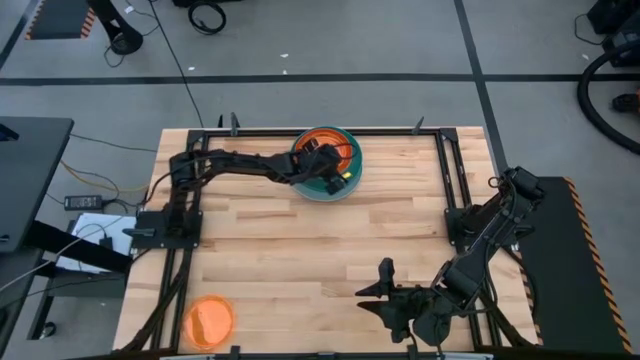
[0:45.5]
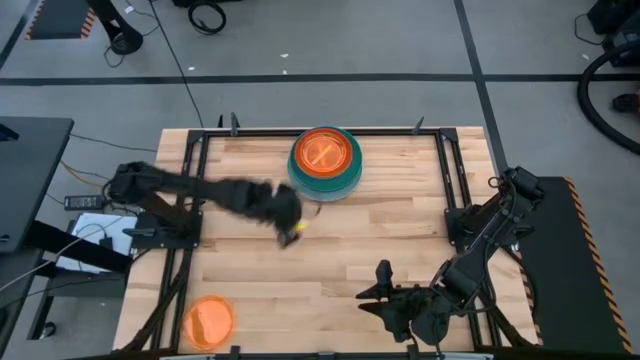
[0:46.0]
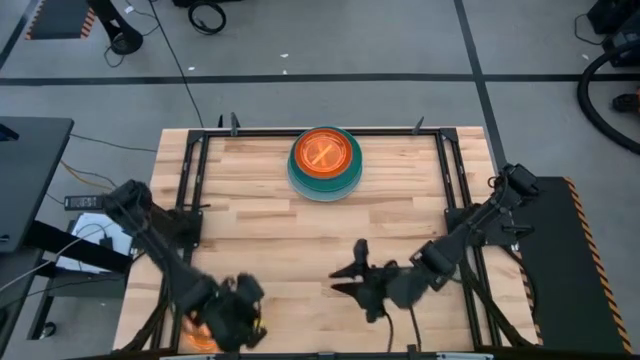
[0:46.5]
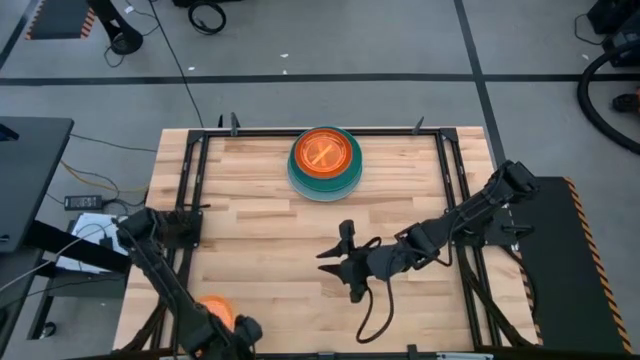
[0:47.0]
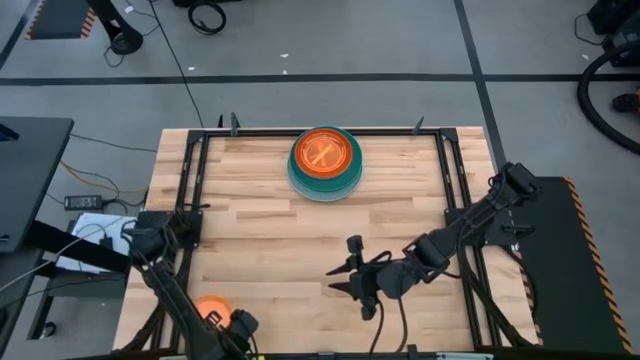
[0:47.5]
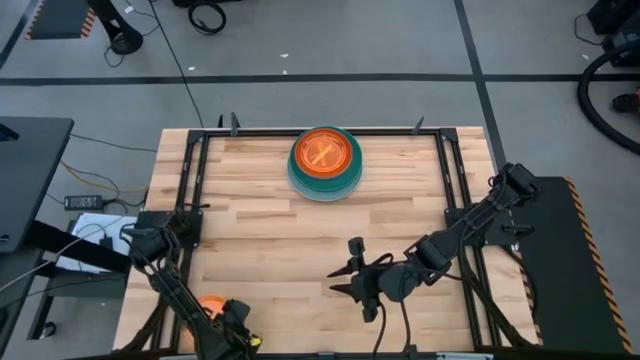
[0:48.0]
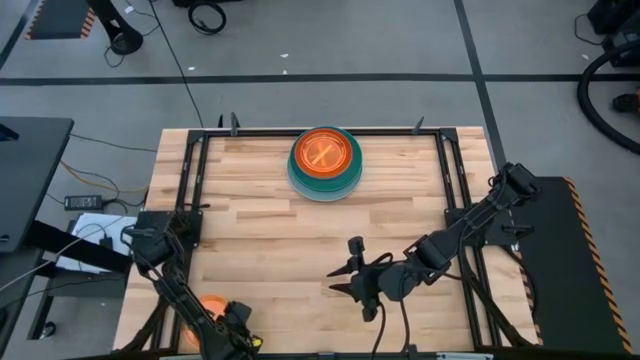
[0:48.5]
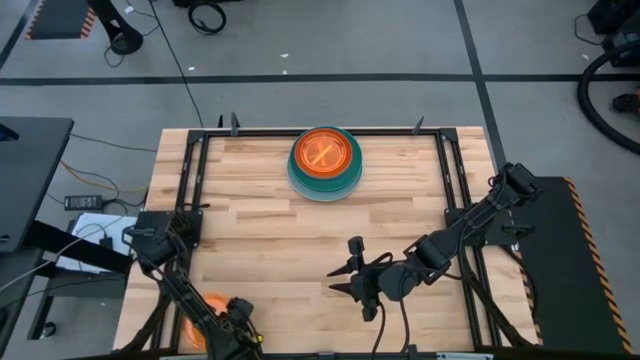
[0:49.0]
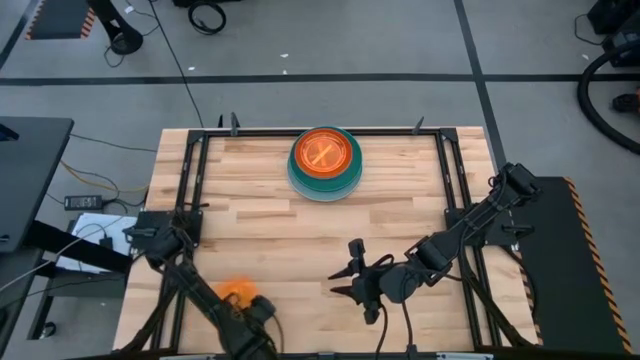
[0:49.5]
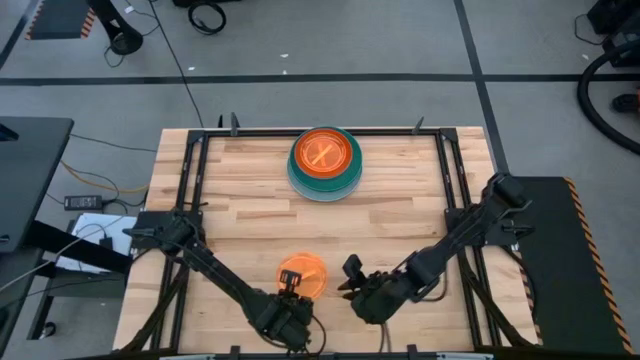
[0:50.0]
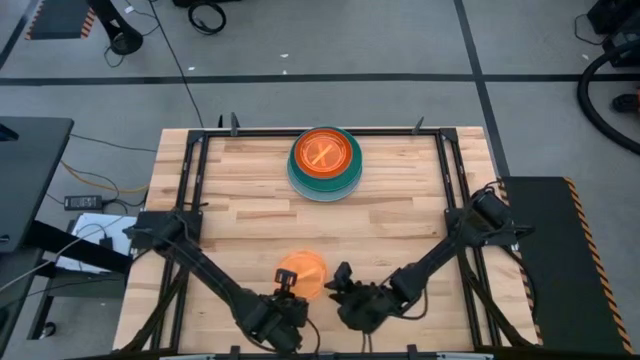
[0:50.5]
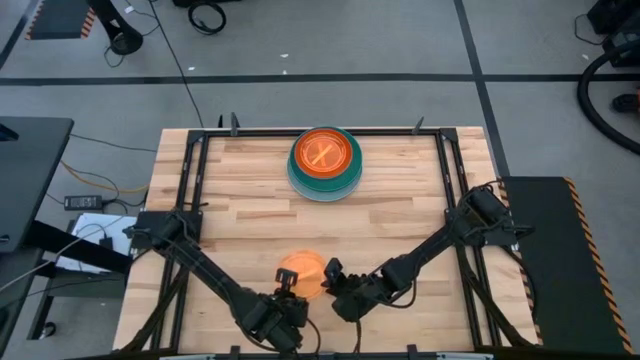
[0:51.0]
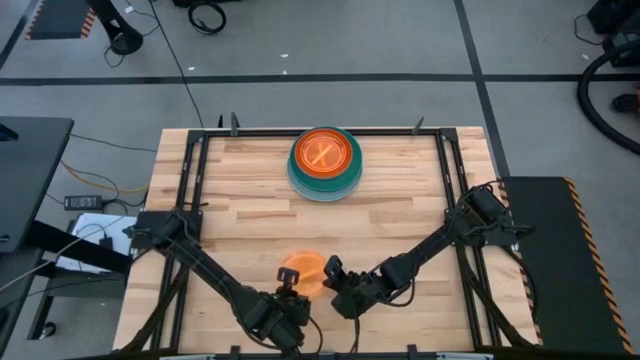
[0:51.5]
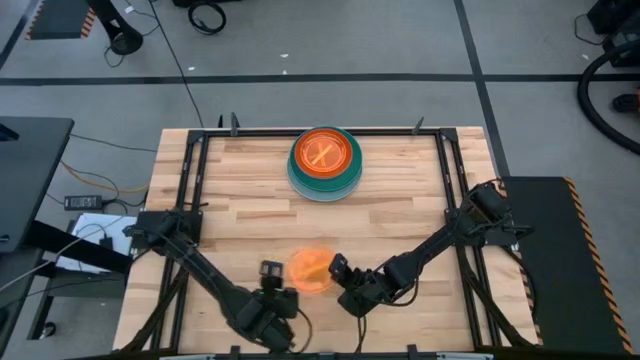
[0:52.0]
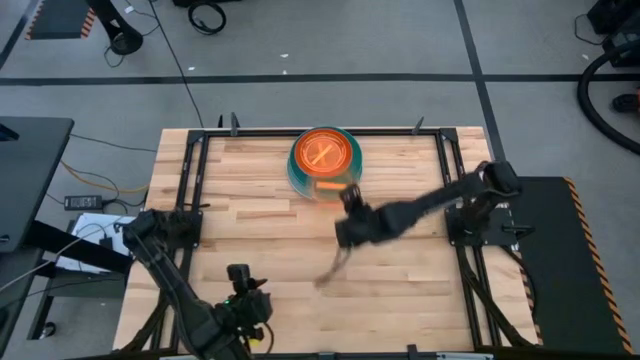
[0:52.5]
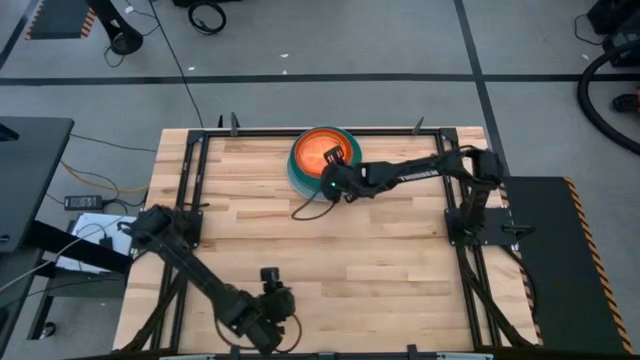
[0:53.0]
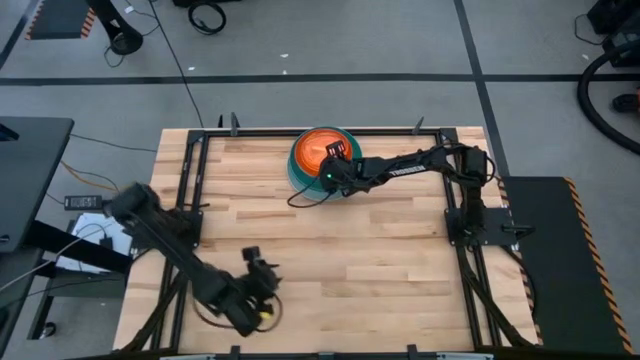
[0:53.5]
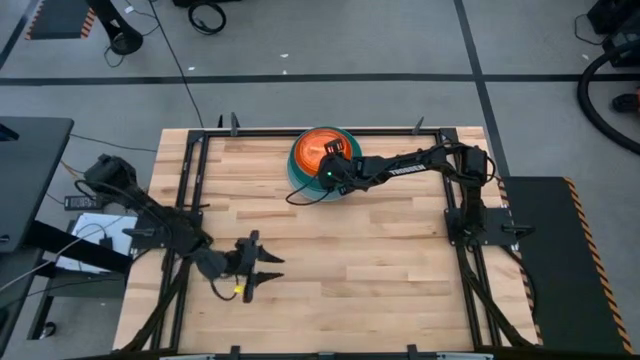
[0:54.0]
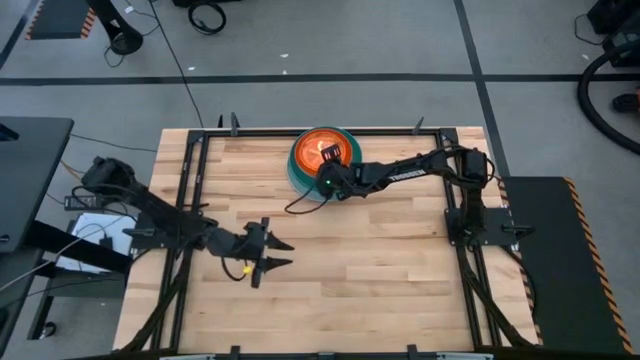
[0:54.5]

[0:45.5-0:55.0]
Task: Stack plastic plates
Stack the orange plate on top of the orange plate

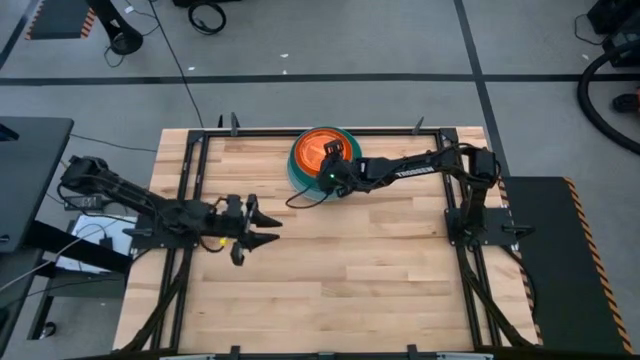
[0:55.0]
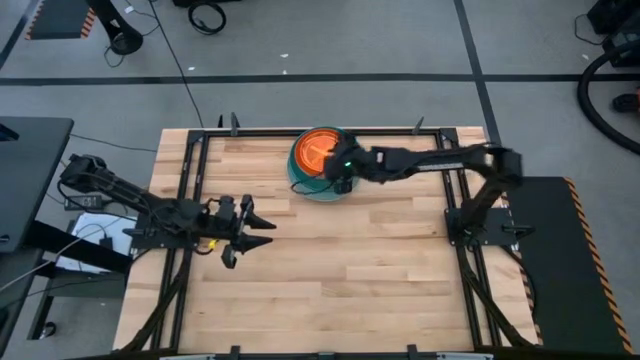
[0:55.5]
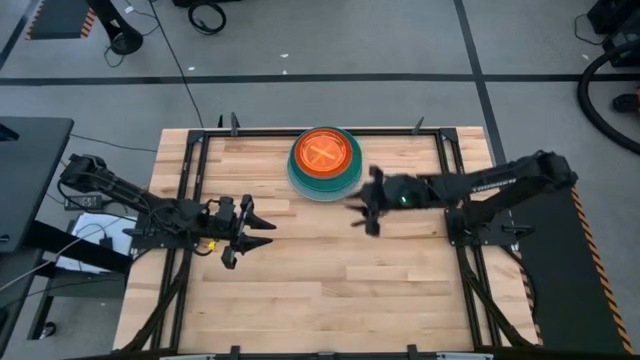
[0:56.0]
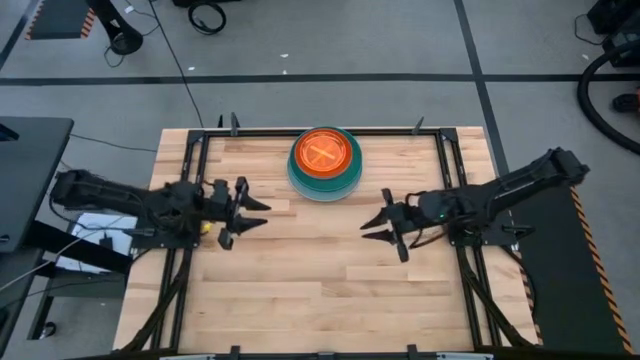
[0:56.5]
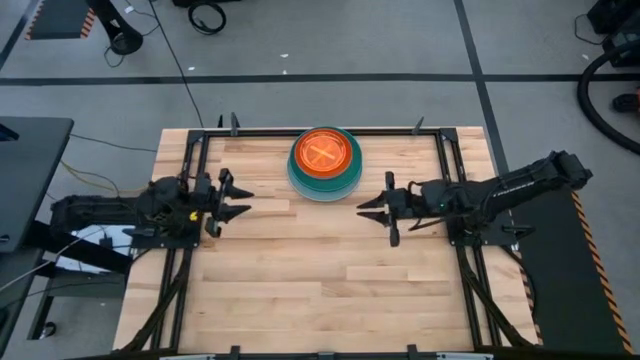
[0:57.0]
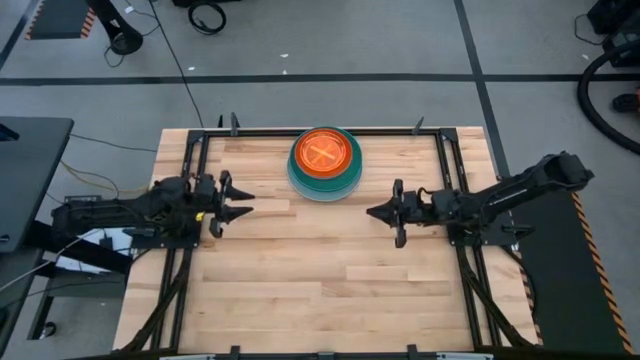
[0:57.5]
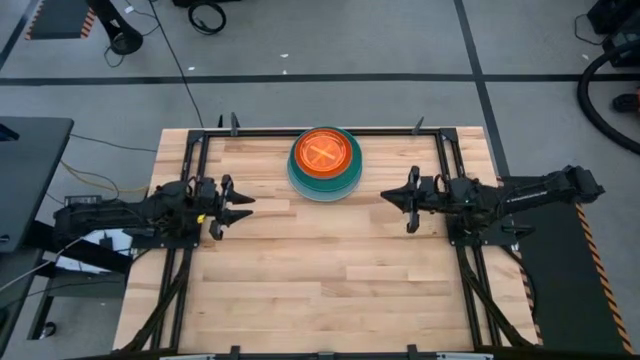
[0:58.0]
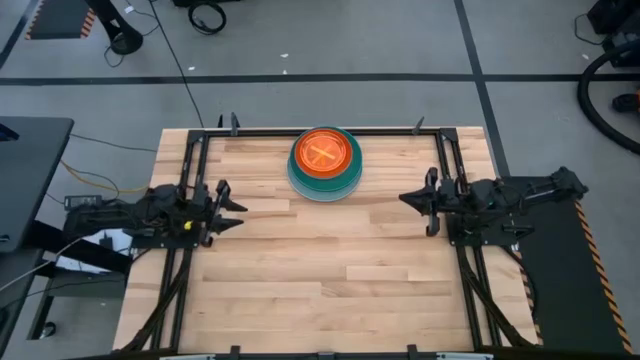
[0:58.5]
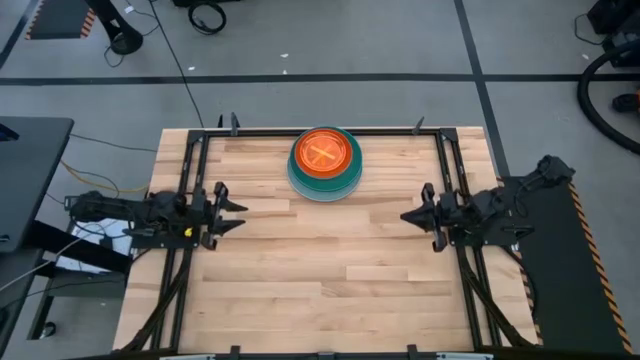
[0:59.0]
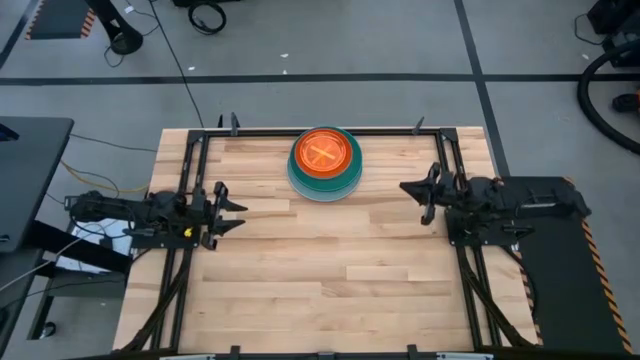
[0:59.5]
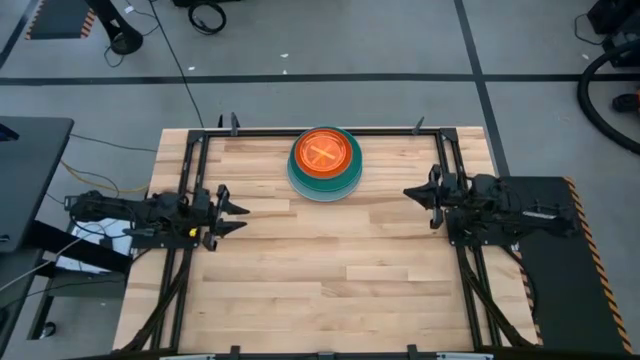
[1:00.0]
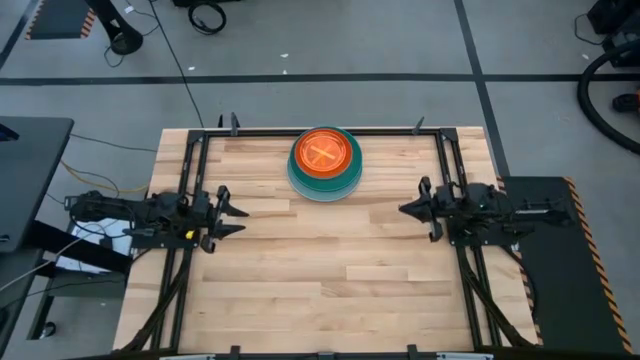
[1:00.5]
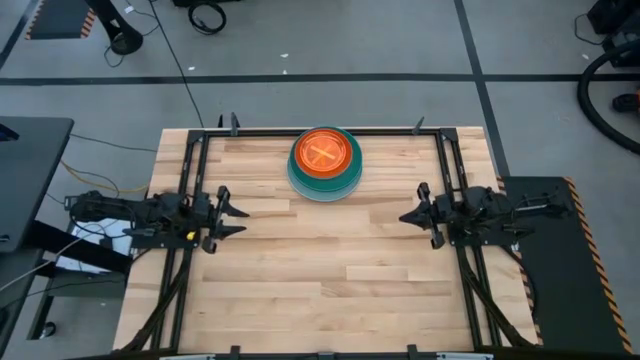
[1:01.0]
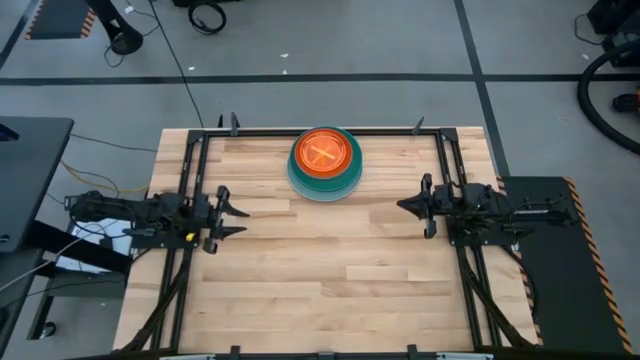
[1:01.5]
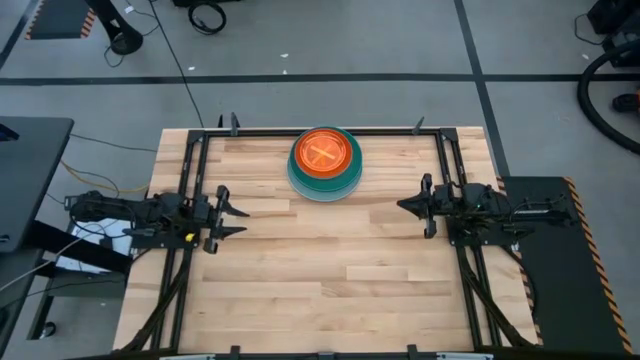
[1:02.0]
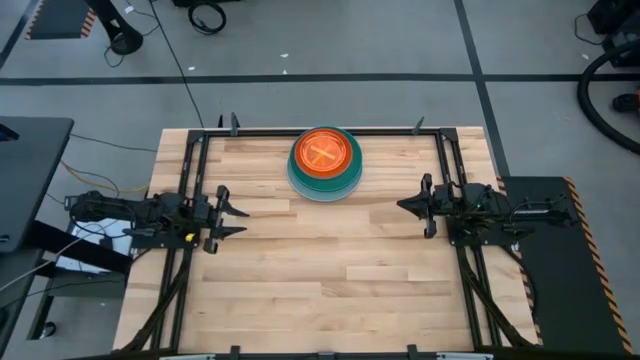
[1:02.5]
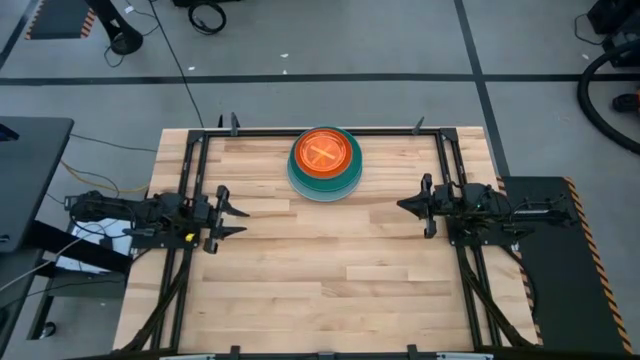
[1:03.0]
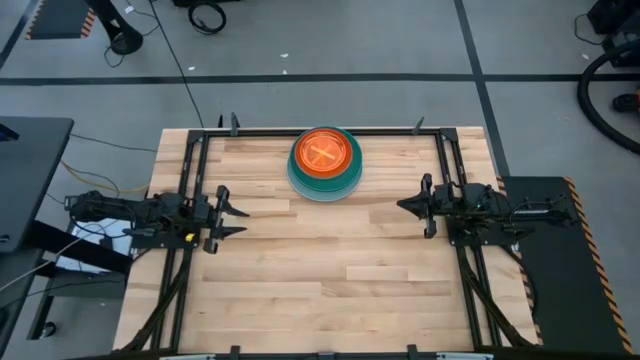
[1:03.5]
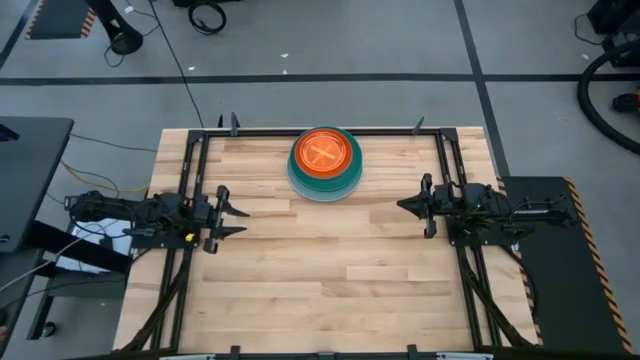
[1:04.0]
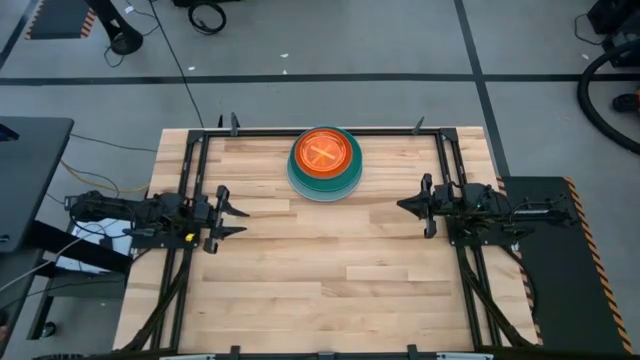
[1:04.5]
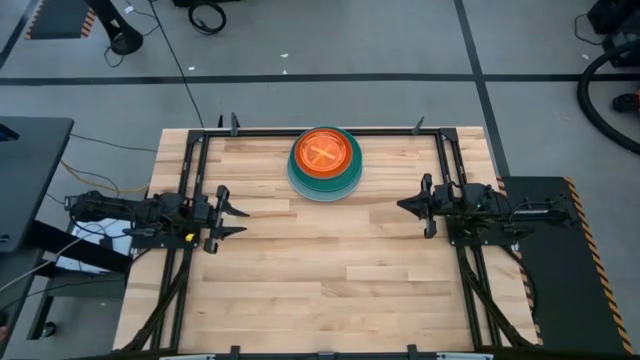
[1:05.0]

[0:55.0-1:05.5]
Return to Home Position

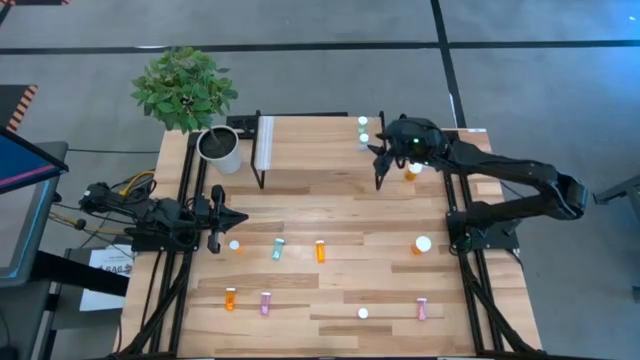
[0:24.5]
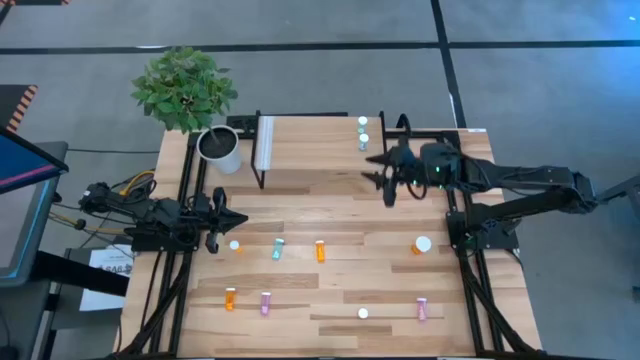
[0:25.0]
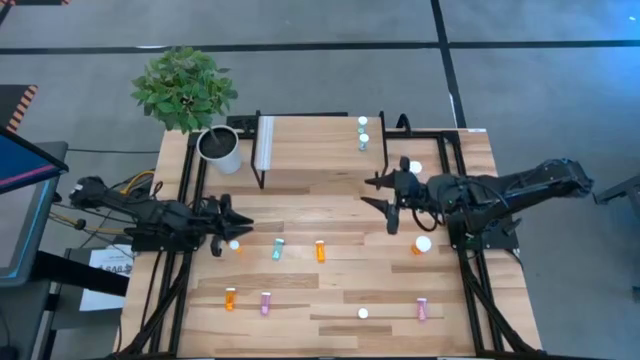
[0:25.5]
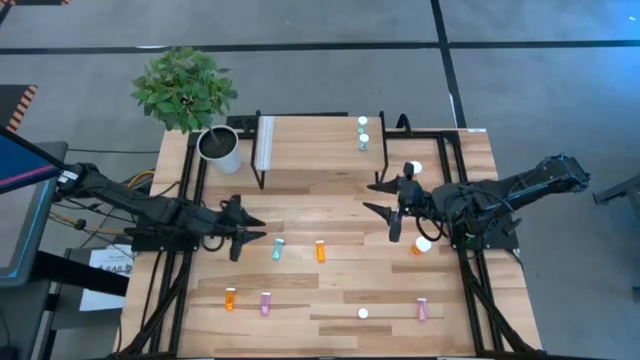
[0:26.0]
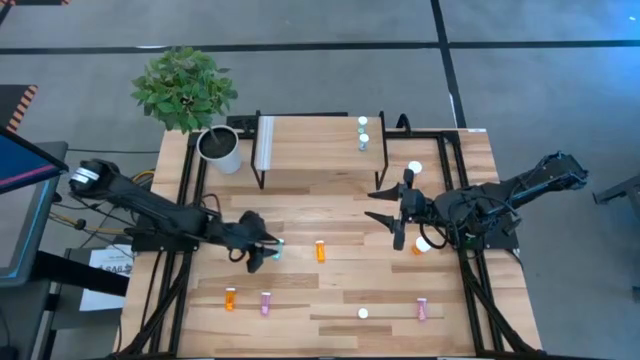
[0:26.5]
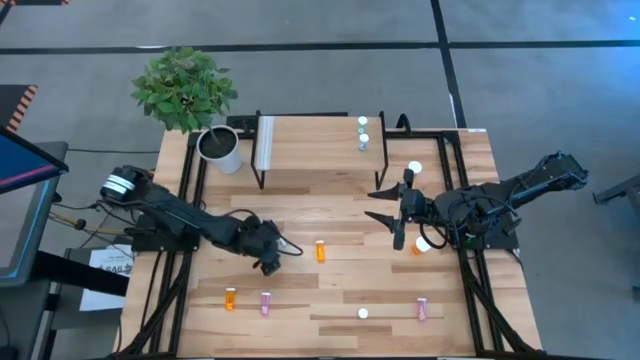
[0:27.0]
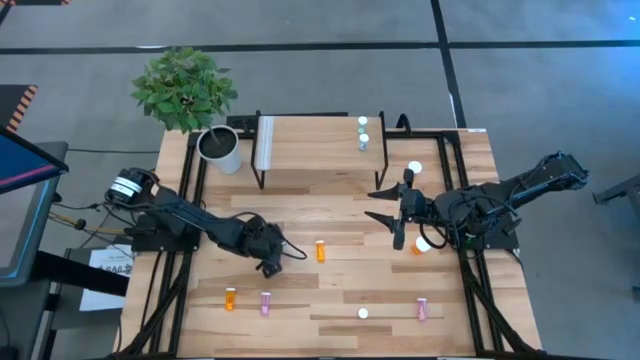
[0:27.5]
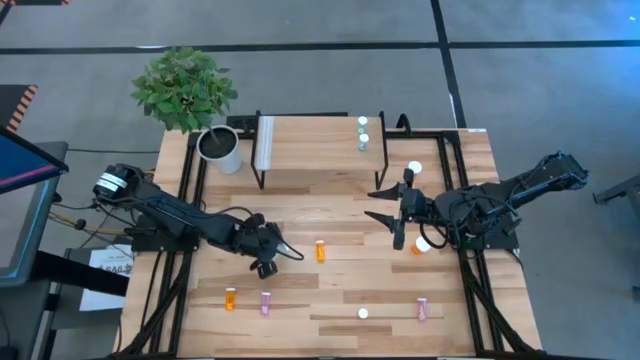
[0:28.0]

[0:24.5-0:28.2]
Task: Pick and place medicine bottles onto shelf by color
Put the blue pill bottle on the shelf aligned with the other blue pill bottles
